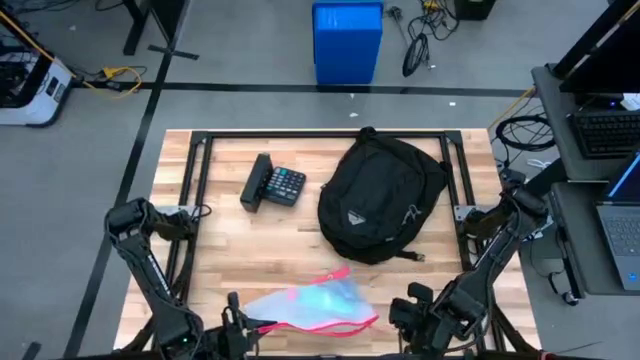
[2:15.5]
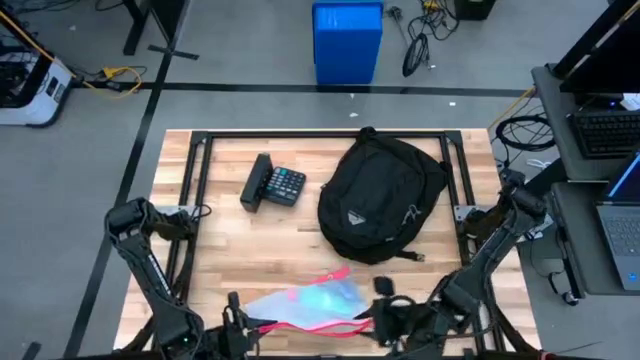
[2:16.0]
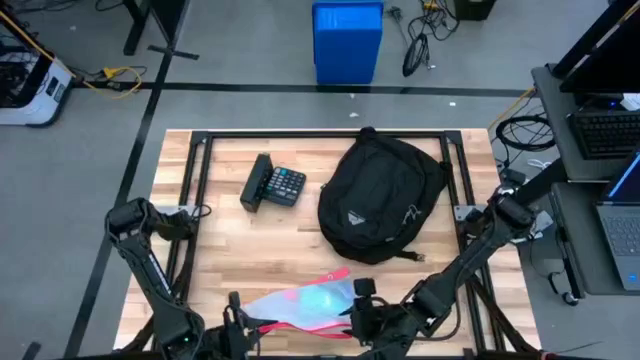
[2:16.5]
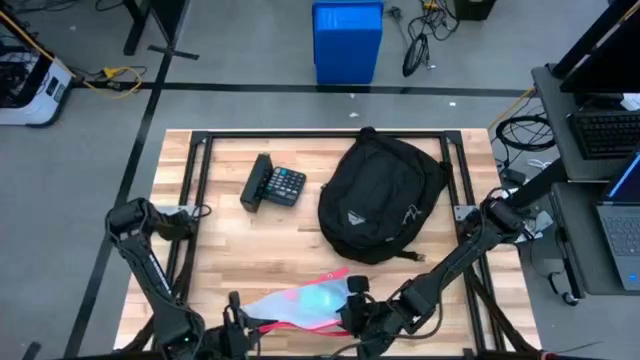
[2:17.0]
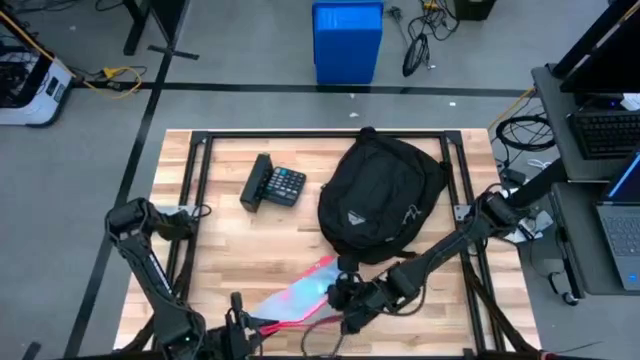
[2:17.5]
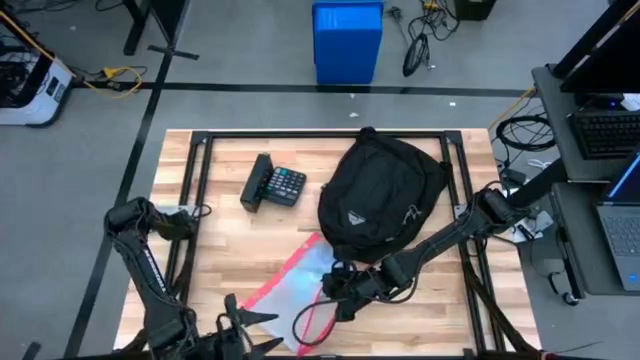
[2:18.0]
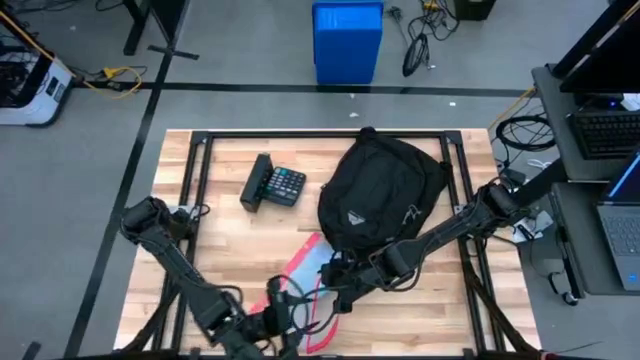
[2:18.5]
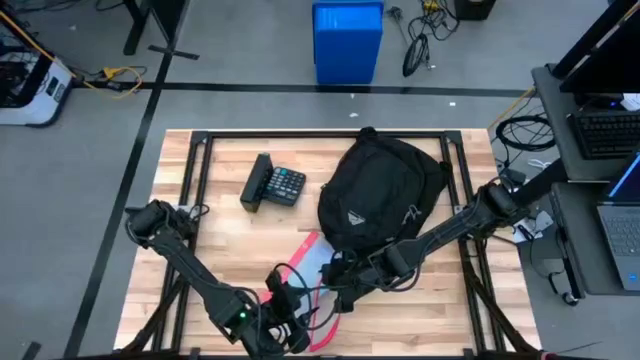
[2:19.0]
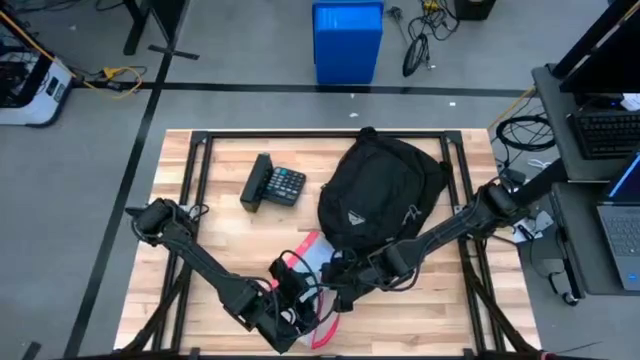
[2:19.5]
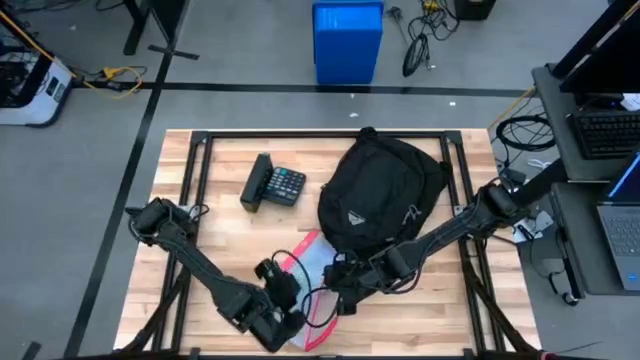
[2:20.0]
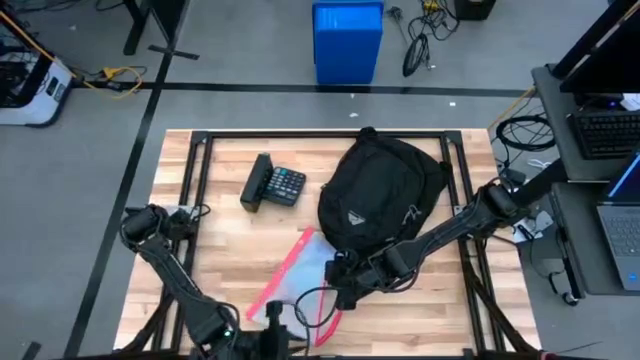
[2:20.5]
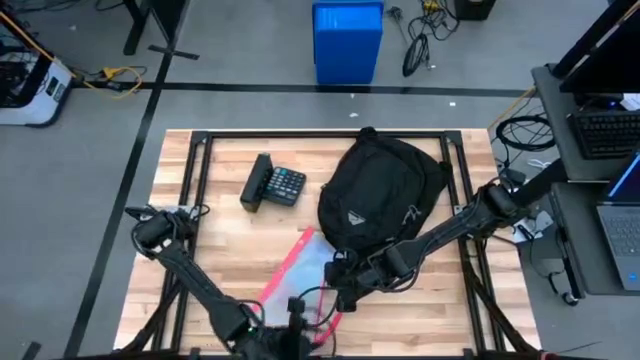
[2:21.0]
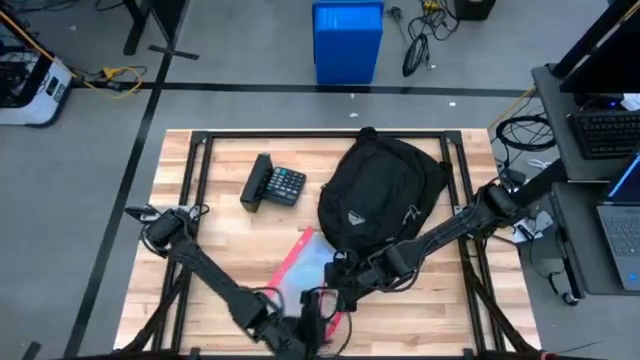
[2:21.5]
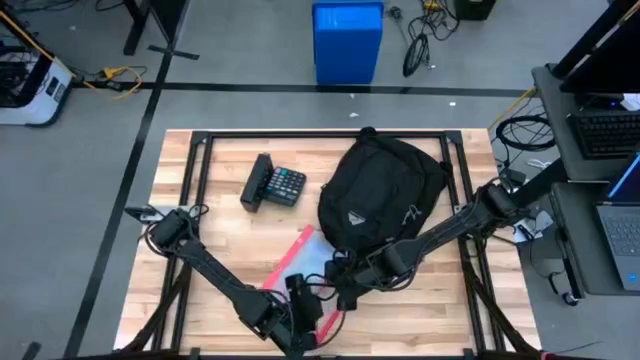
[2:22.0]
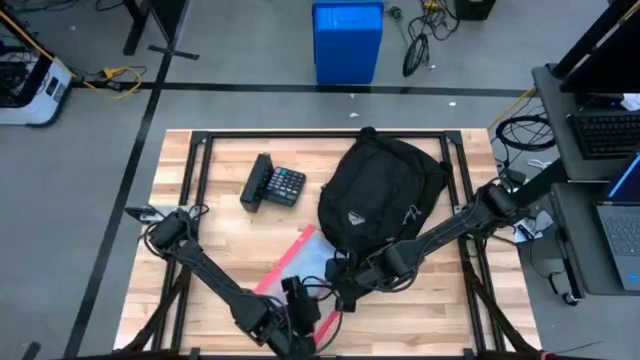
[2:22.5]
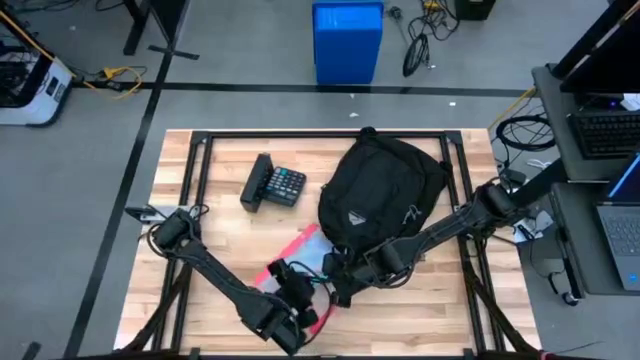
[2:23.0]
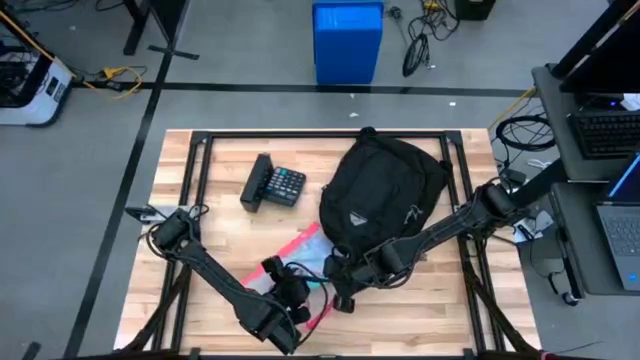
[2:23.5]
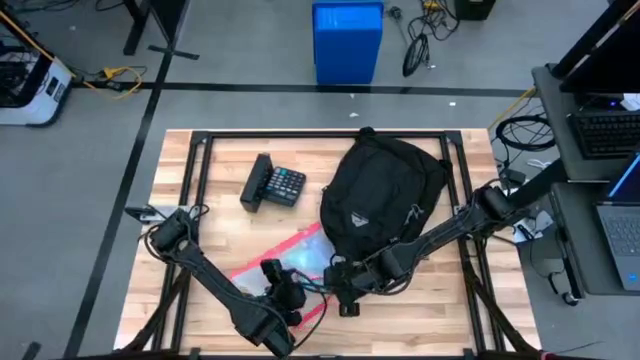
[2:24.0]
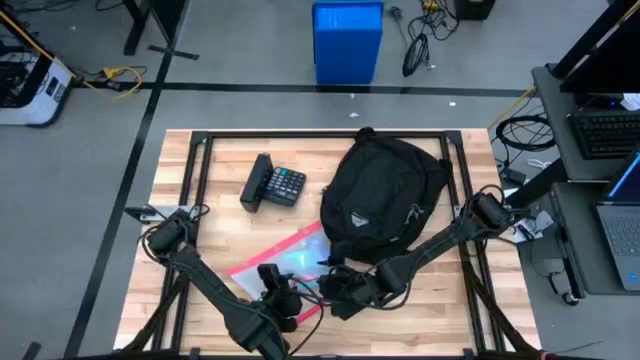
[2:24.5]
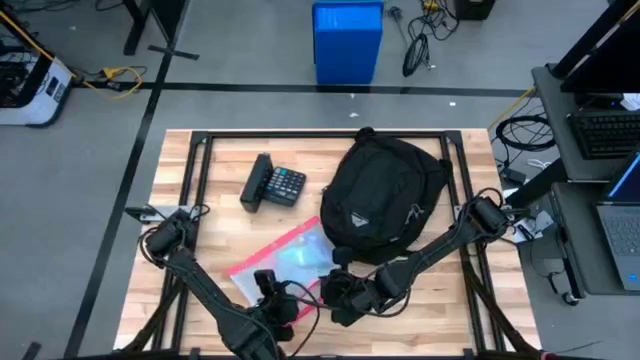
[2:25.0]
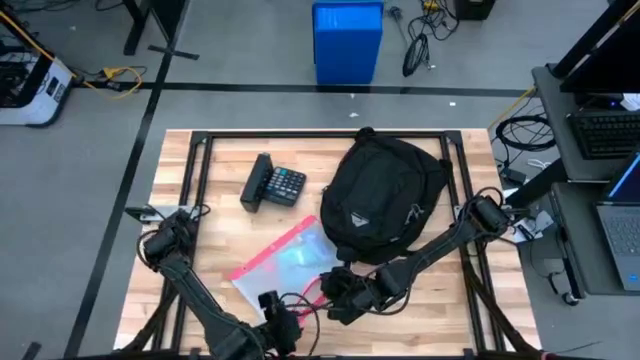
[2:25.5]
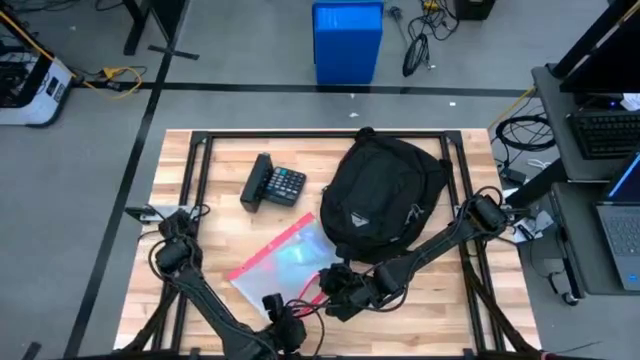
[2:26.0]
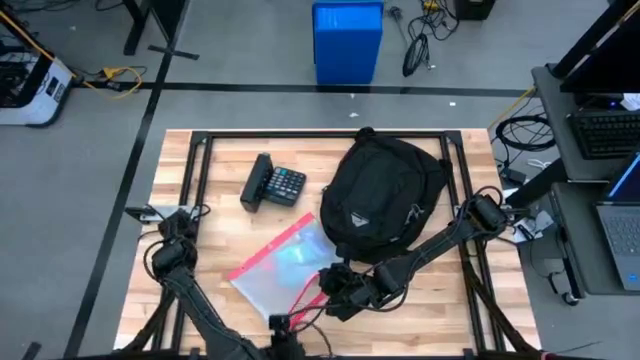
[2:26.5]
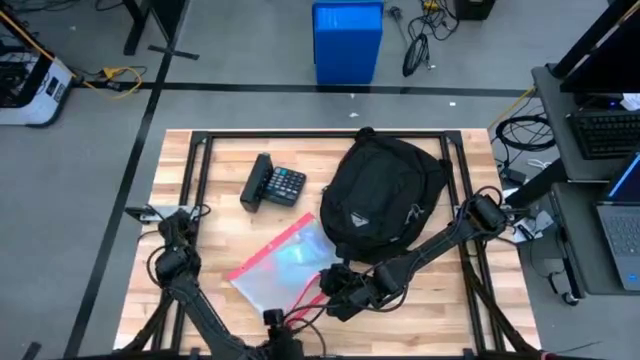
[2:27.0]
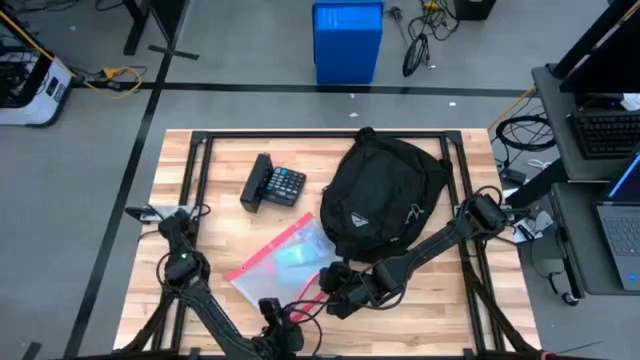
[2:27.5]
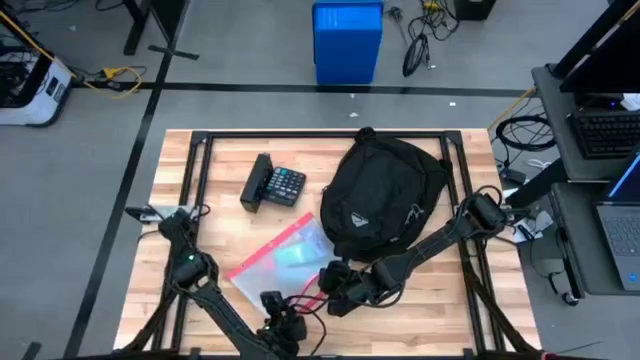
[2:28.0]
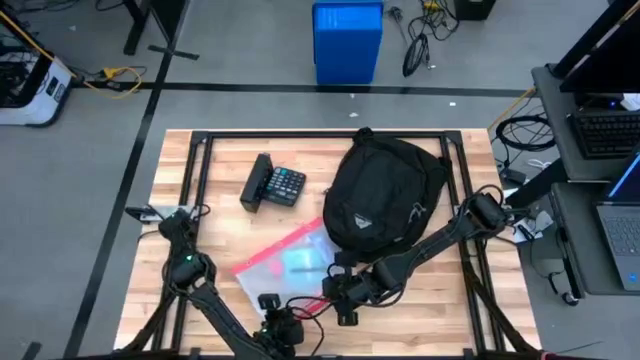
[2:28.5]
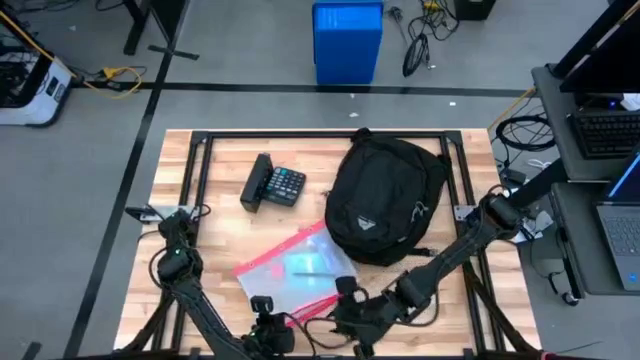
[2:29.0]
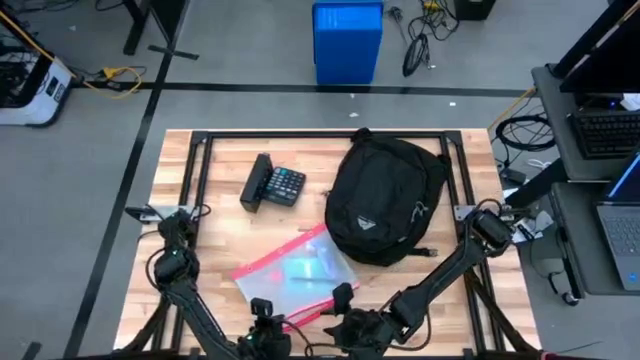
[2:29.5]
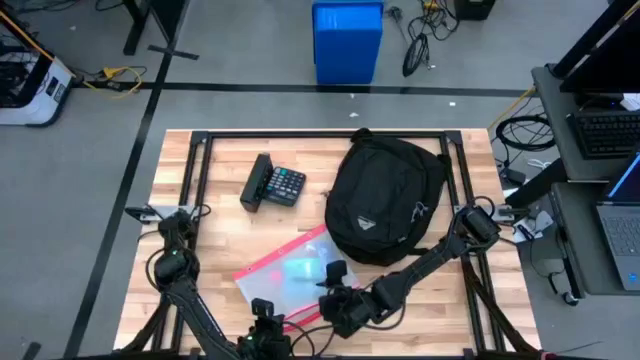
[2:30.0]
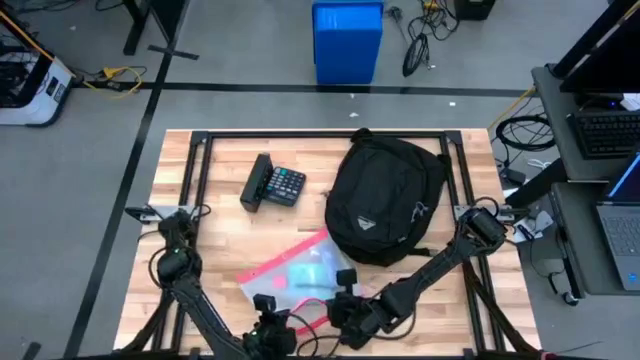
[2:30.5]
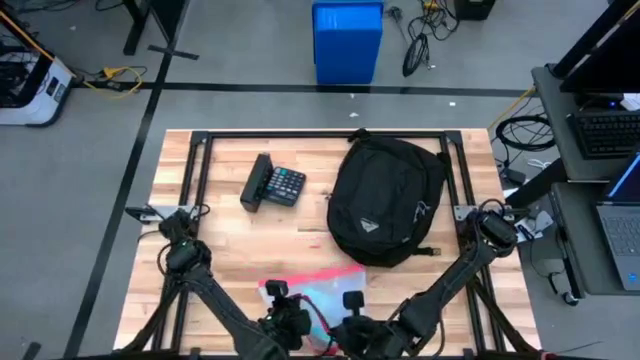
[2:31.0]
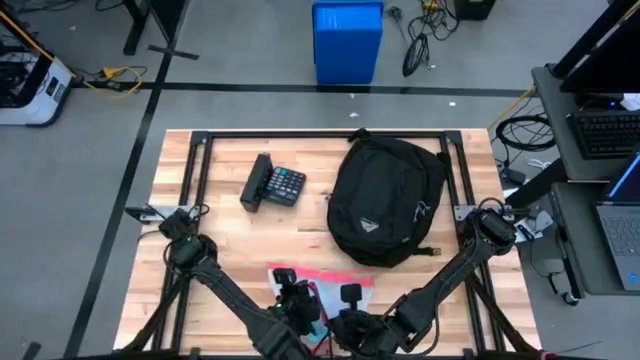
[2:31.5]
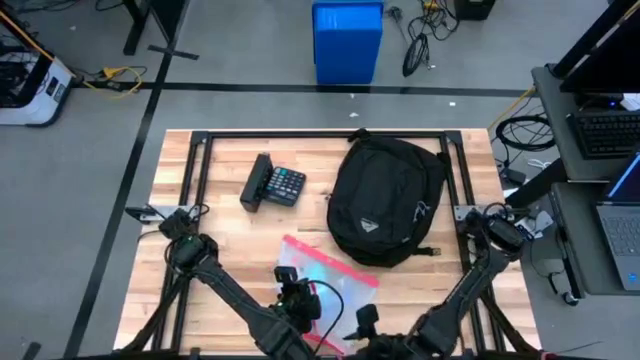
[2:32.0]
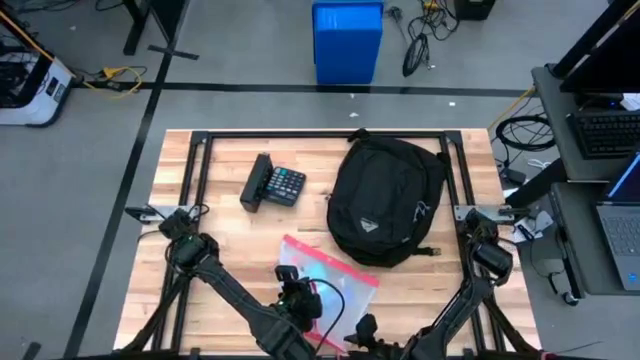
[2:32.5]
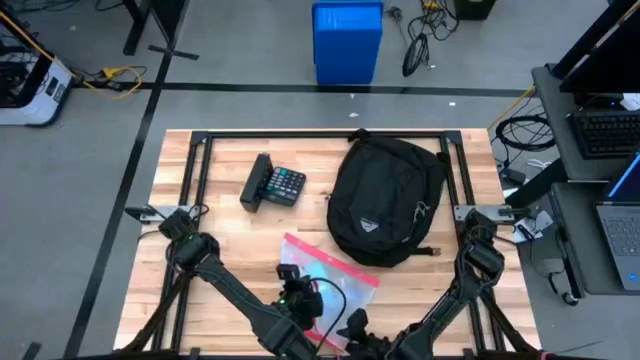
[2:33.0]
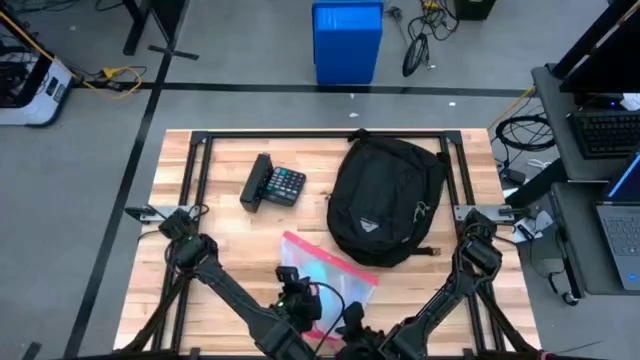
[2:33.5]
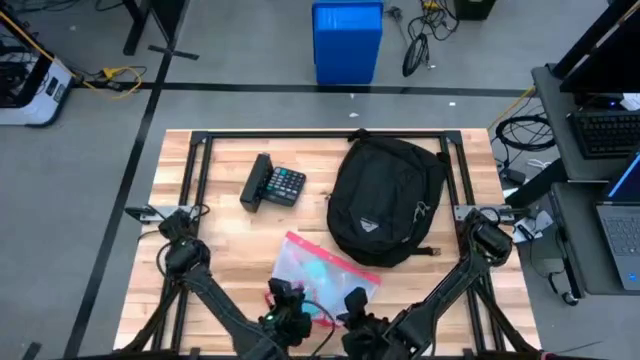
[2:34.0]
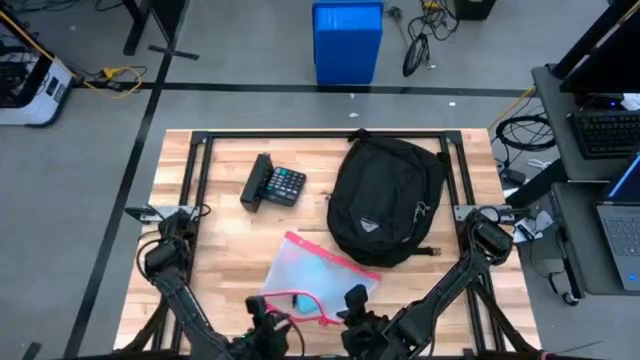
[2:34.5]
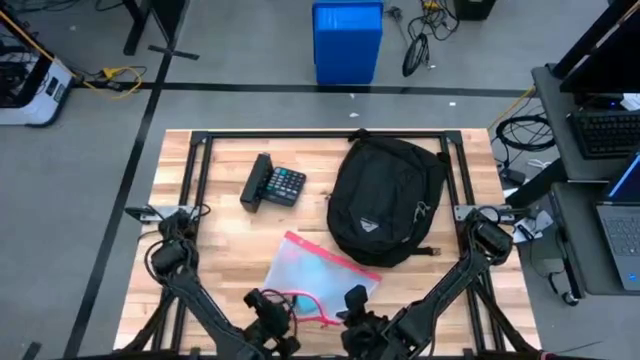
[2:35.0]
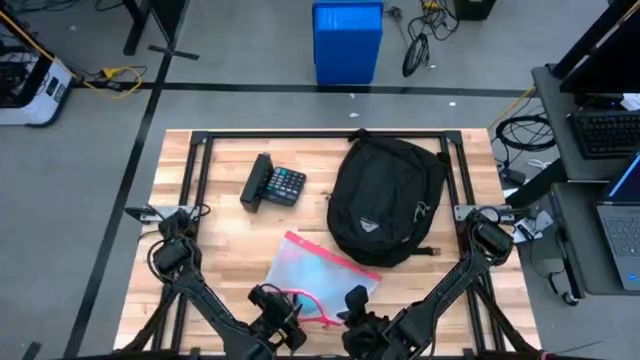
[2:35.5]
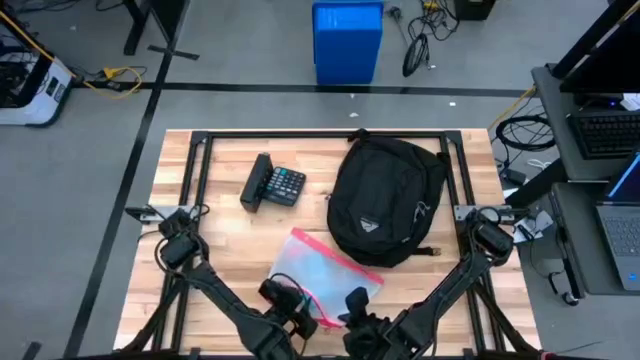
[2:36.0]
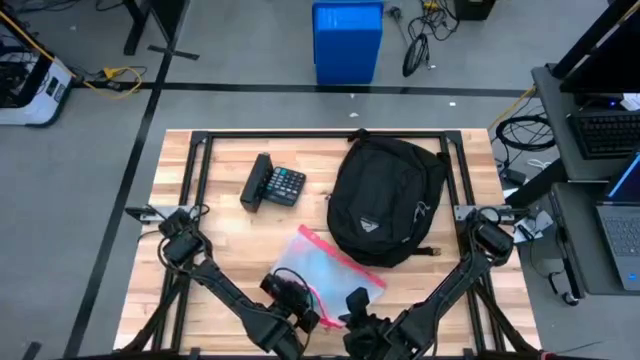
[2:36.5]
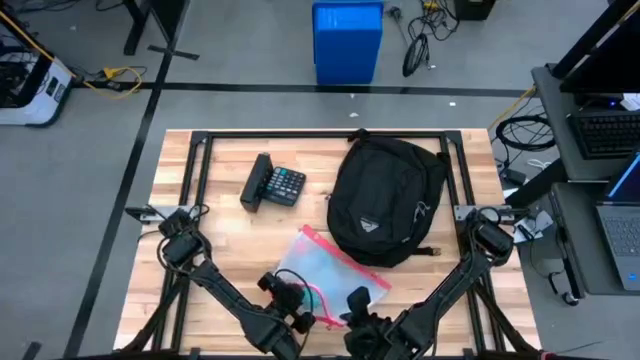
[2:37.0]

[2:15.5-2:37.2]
Task: Unpack backpack
Remove the black pen from the white zip bag

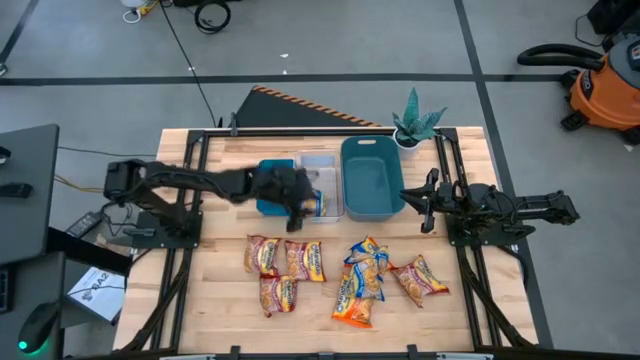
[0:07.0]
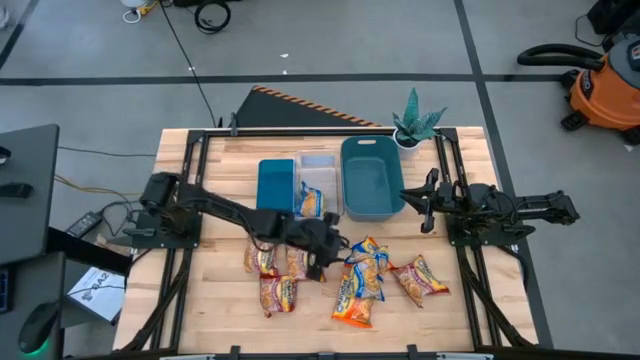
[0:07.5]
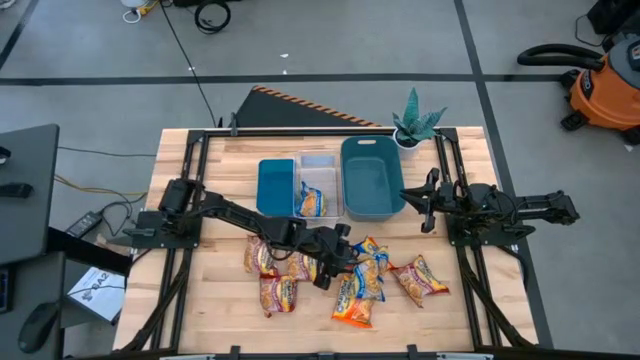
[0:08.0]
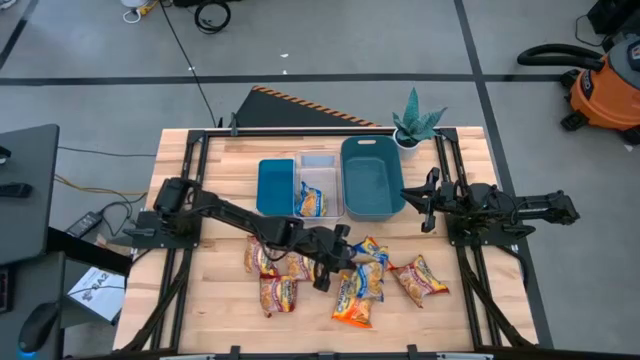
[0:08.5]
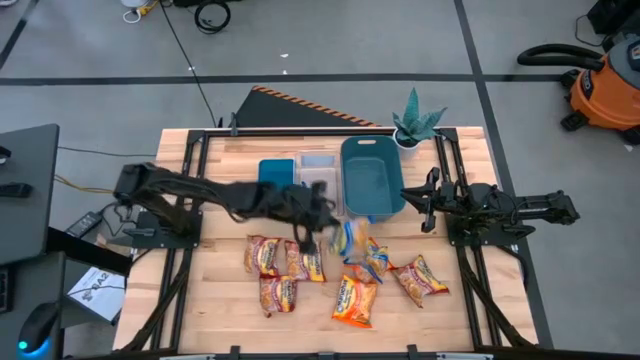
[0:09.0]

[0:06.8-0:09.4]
Task: Sort Maruchan noodles
Put the right blue noodle into the transparent bin
